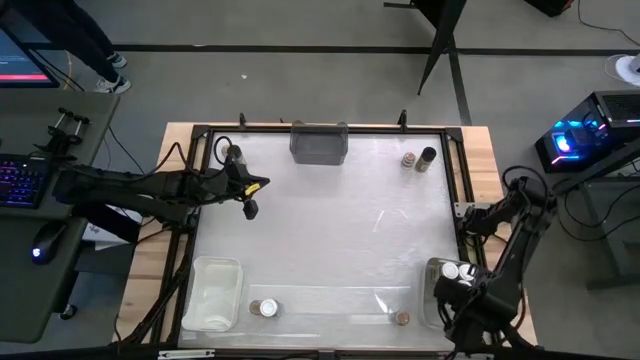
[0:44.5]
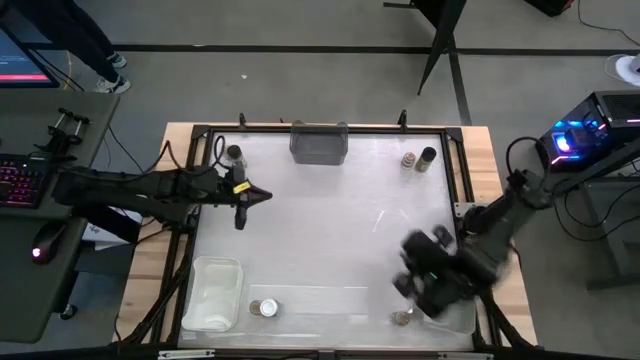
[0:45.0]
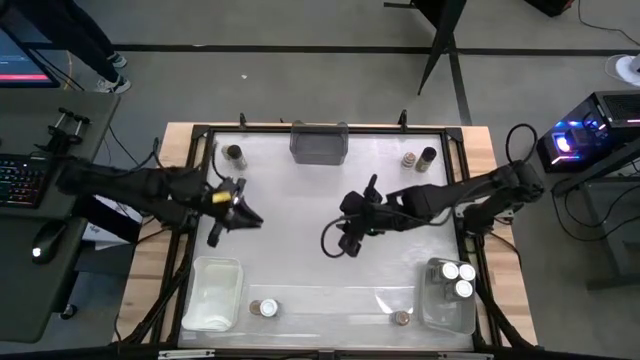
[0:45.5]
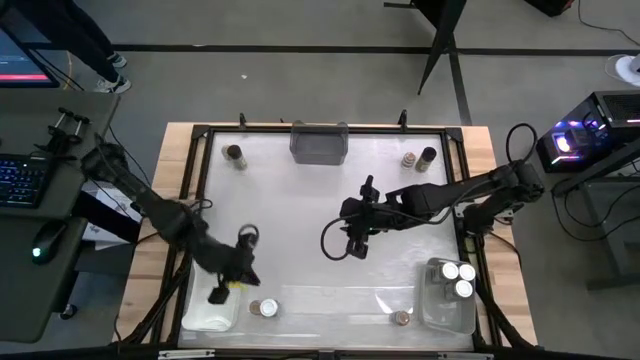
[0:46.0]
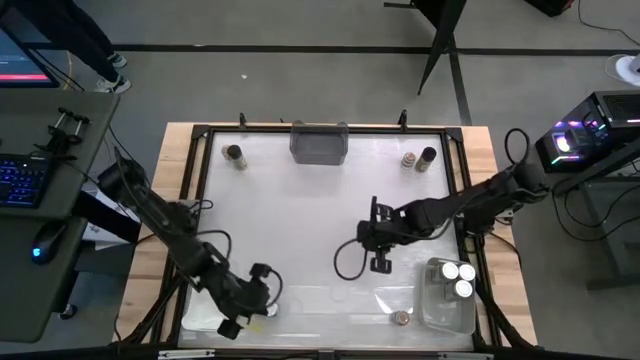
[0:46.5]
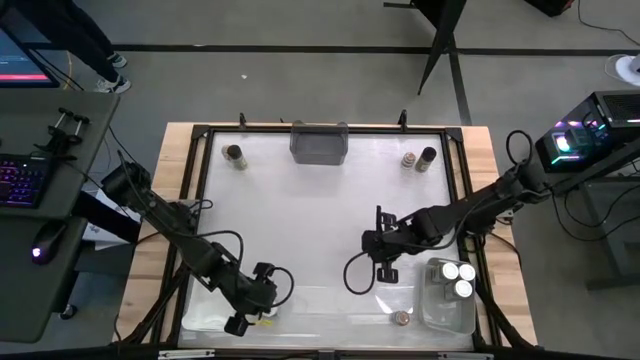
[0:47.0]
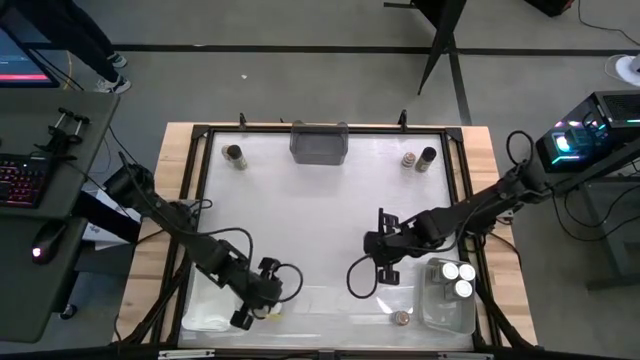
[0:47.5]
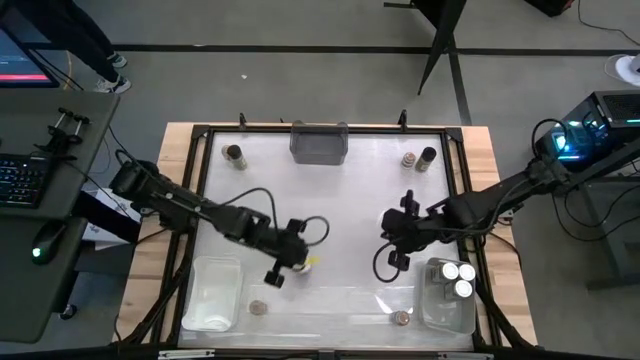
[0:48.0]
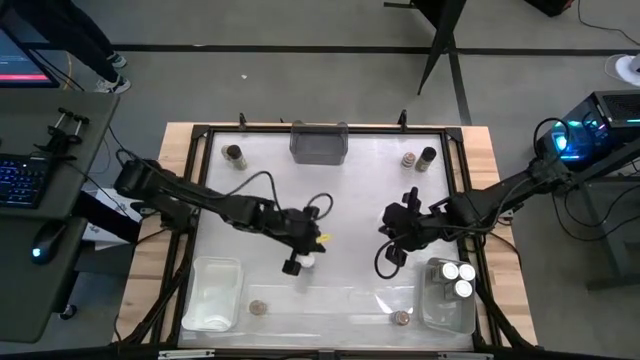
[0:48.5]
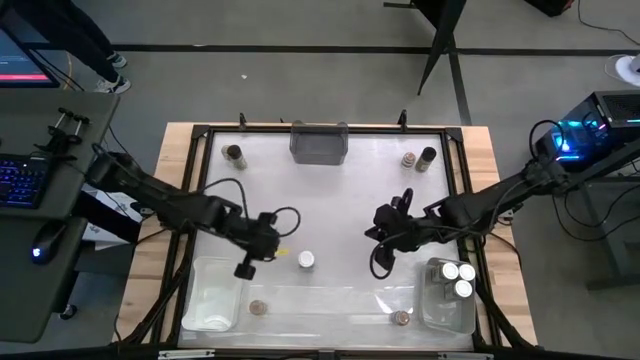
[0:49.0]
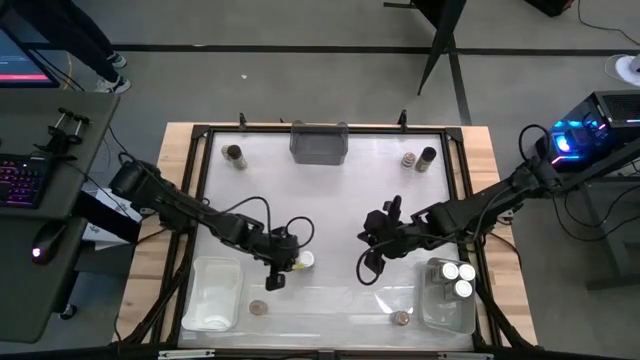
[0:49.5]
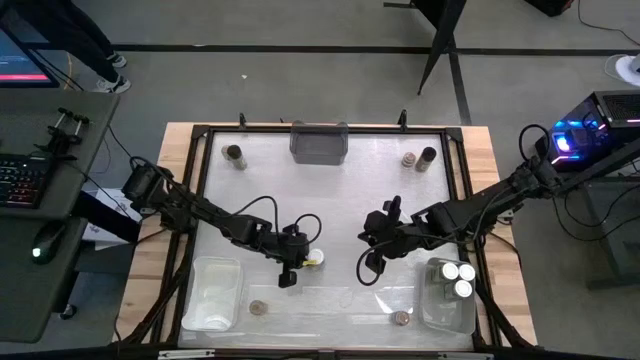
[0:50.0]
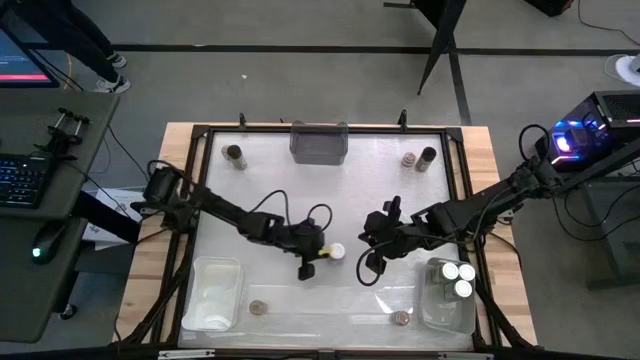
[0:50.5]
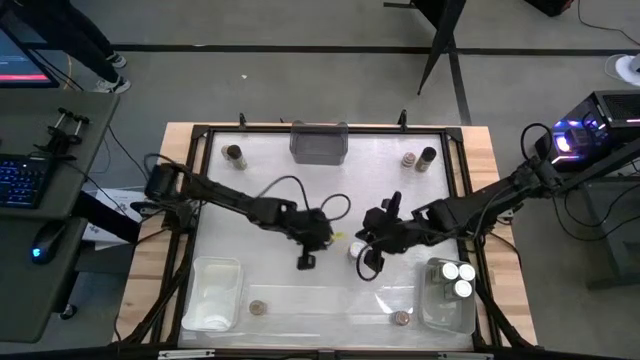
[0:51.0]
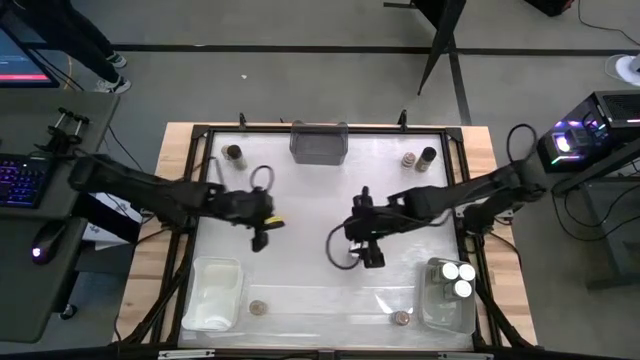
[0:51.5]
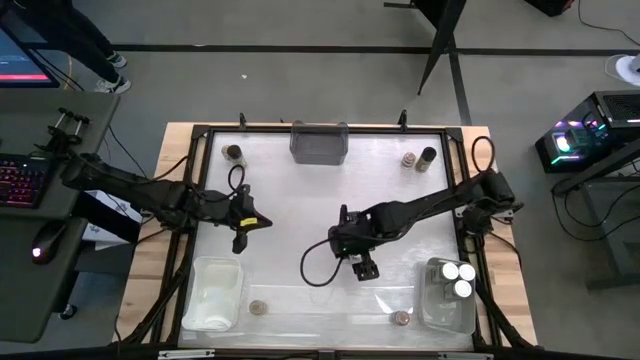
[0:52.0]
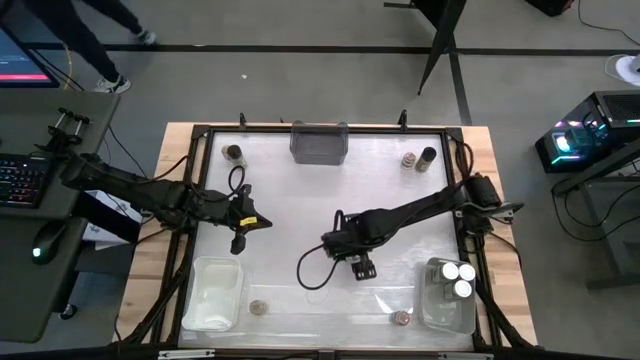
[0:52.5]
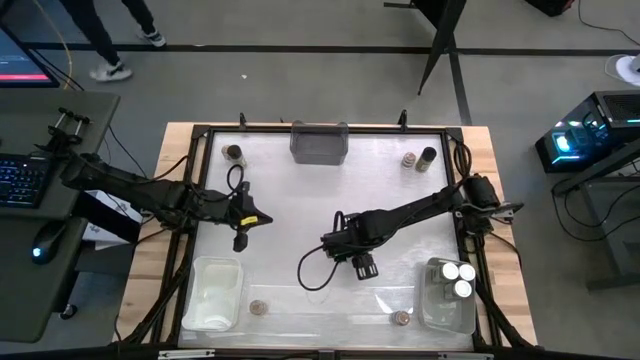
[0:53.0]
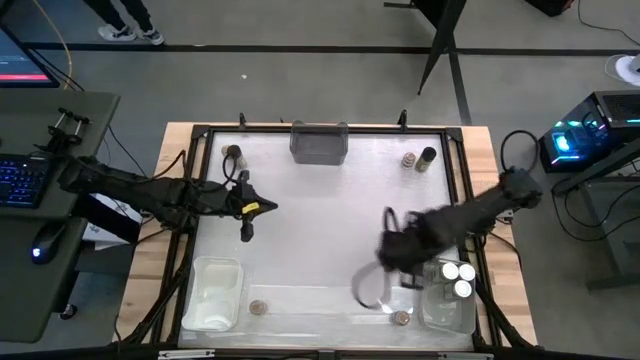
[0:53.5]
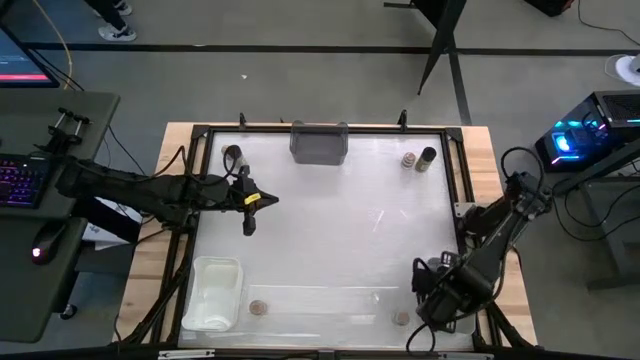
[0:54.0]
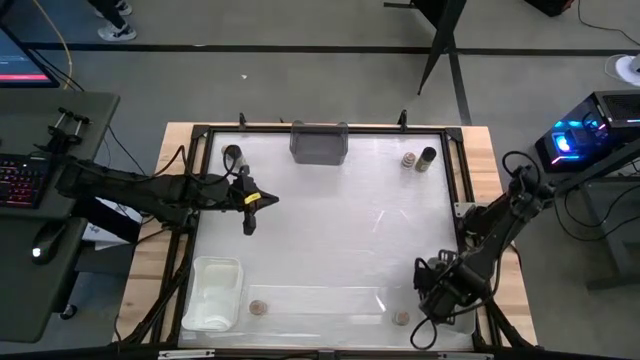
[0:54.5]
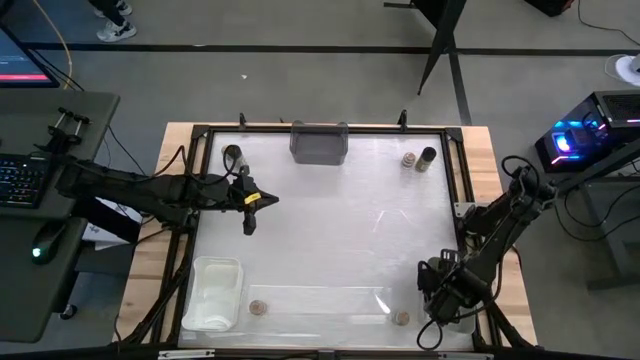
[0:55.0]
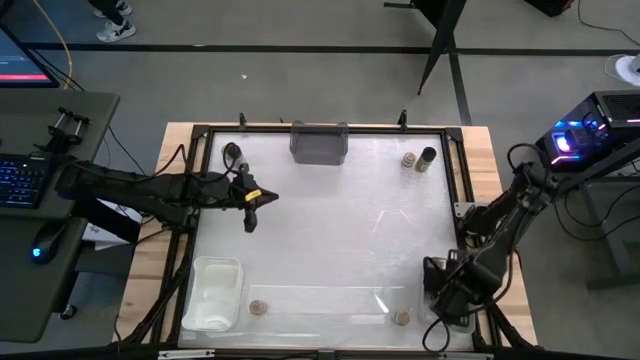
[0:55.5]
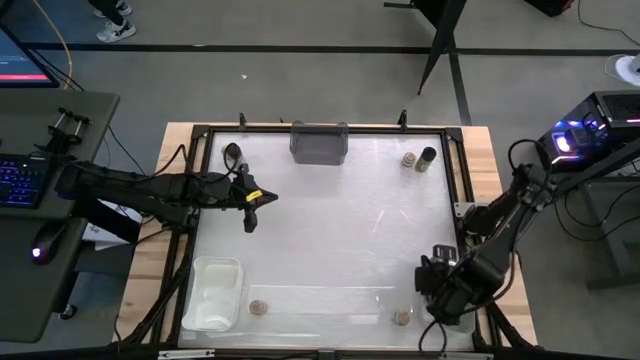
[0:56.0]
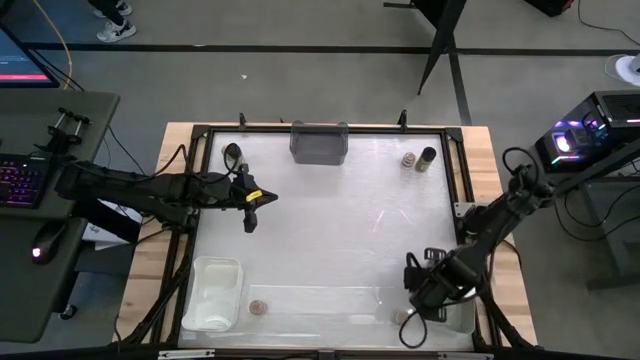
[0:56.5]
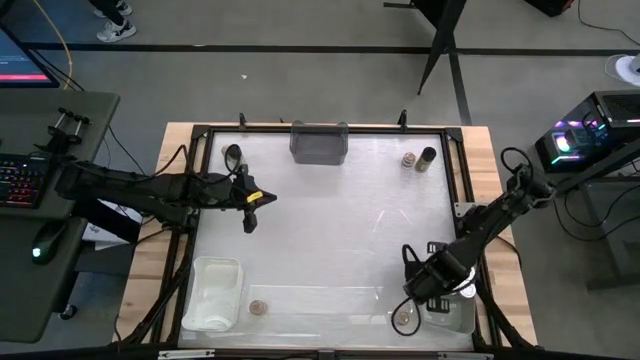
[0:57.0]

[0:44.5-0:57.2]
Task: Sort spices by type
Put the white seasoning bottle into the gray bin

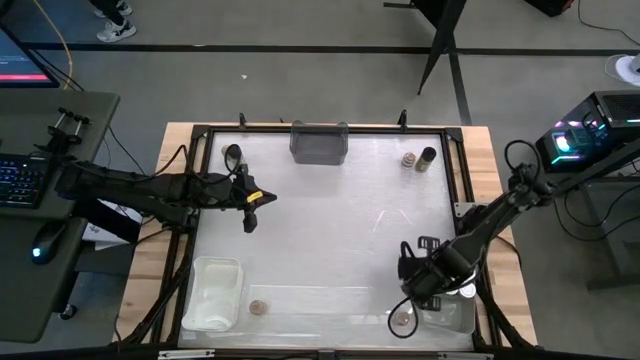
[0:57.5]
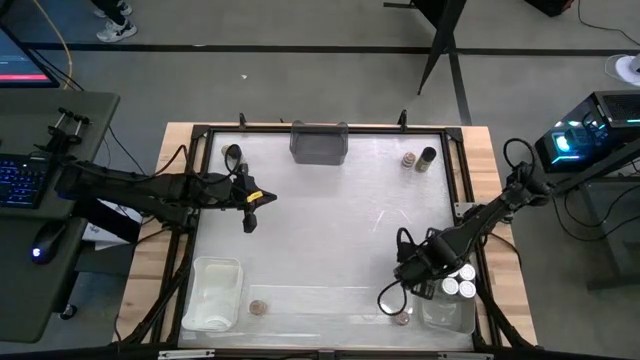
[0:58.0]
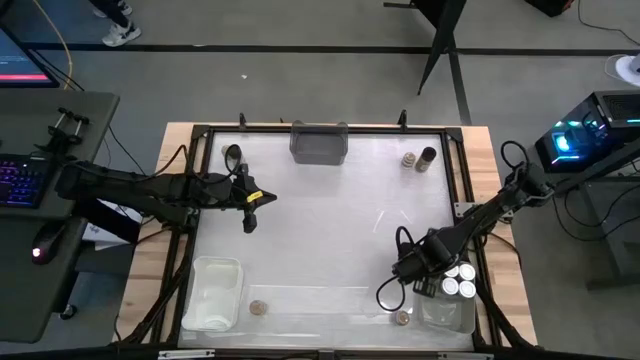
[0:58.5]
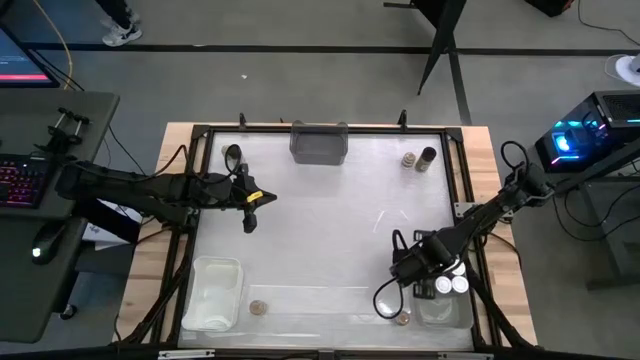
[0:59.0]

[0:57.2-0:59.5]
Adjust the gray bin

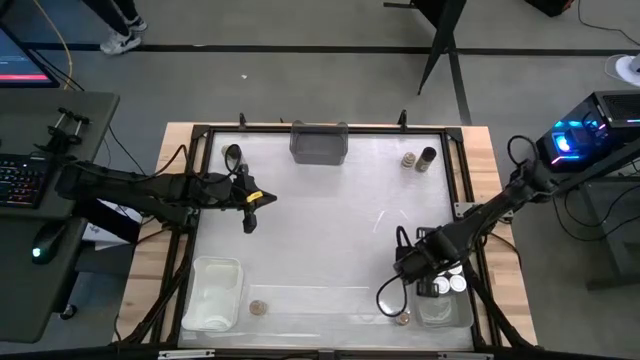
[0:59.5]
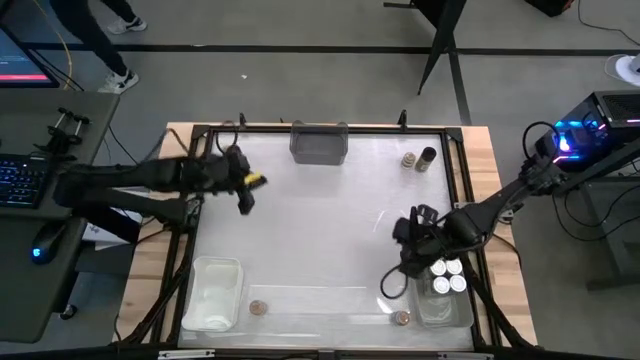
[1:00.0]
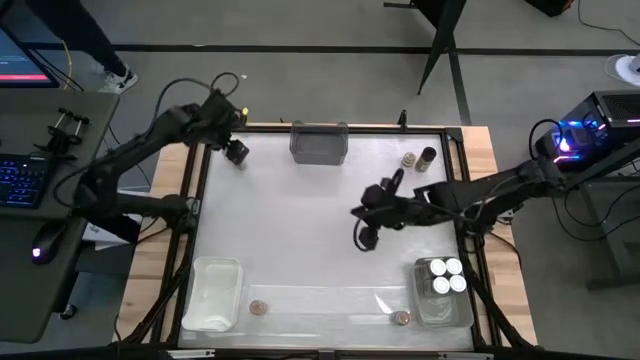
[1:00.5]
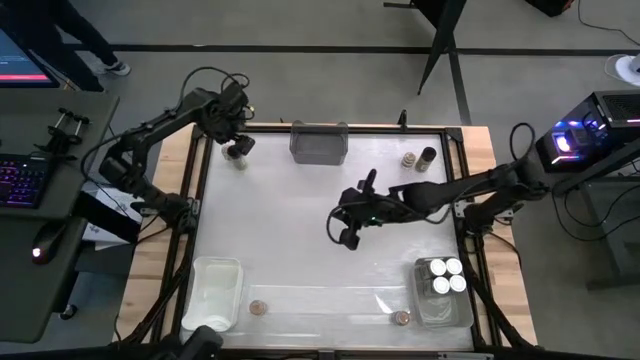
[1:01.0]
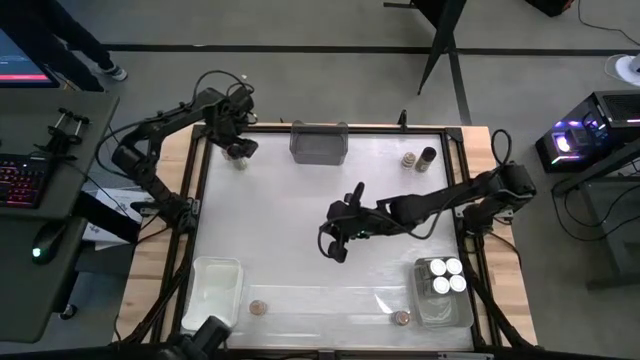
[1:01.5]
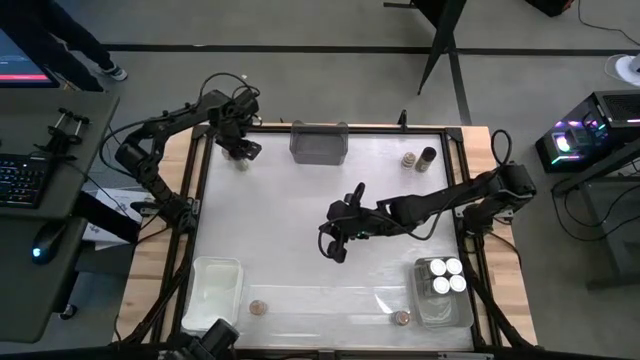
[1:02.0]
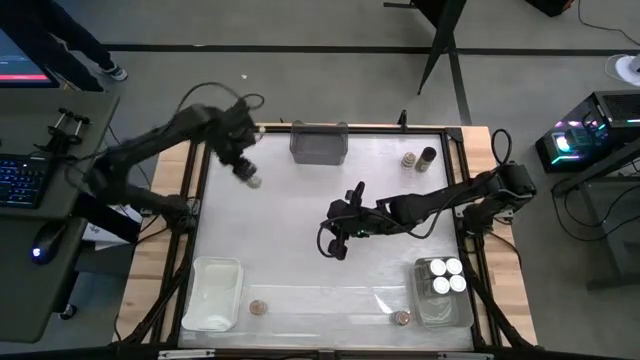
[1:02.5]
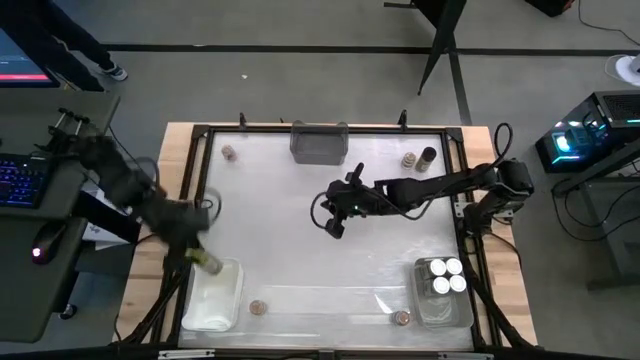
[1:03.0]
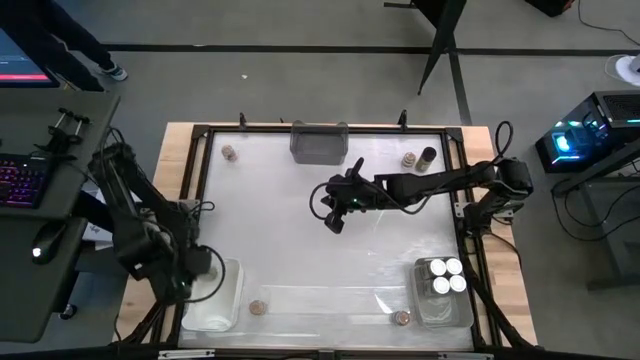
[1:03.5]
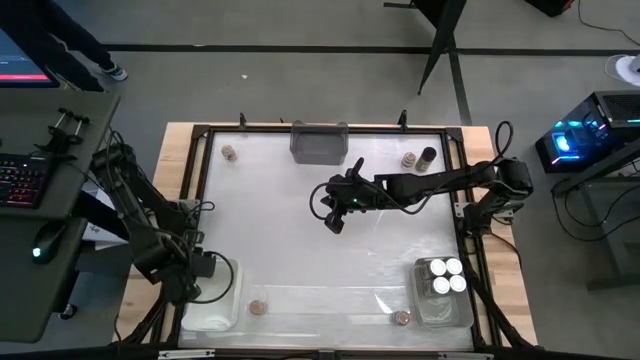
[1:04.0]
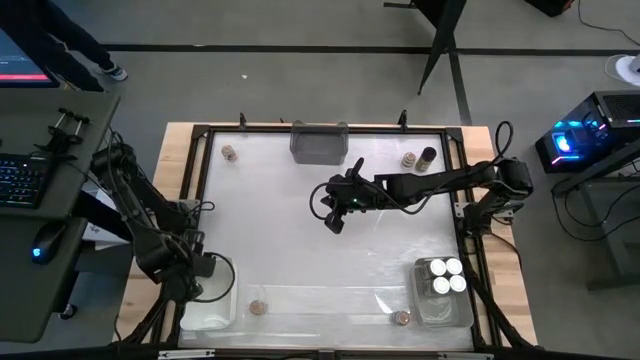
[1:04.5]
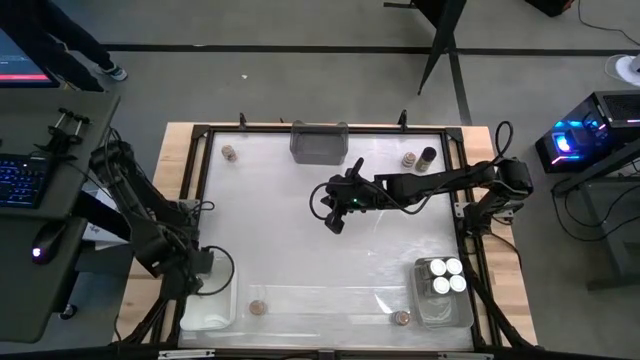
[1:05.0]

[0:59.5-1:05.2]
Put the left black seasoning bottle into the white bin

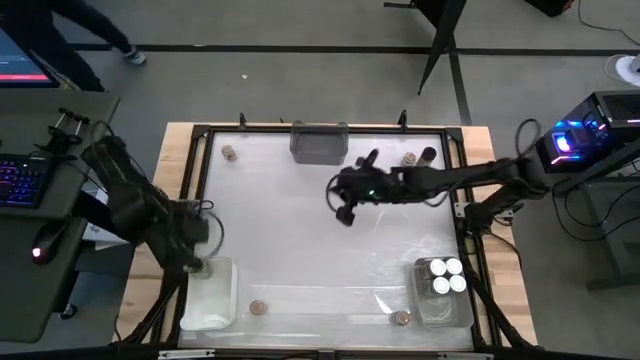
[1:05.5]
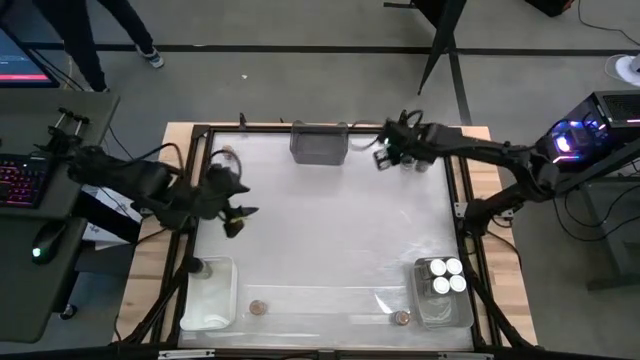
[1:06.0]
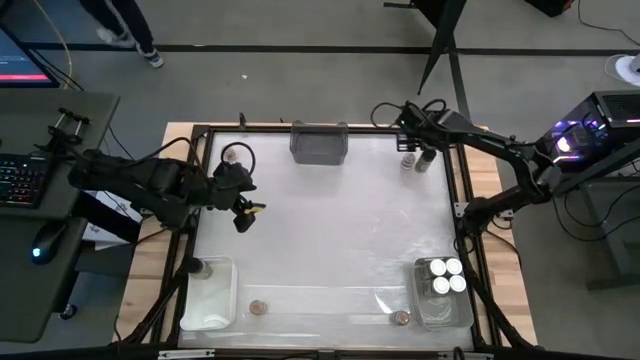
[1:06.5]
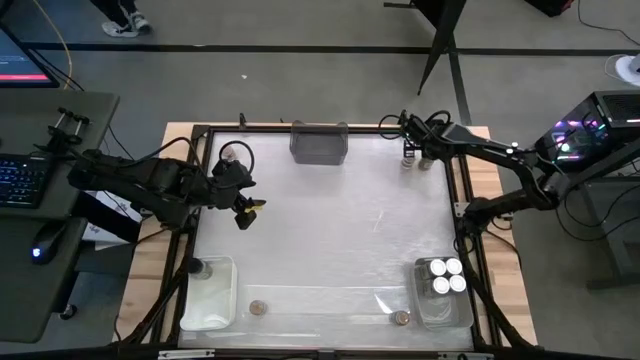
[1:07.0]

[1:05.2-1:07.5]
Put the black seasoning bottle into the white bin
